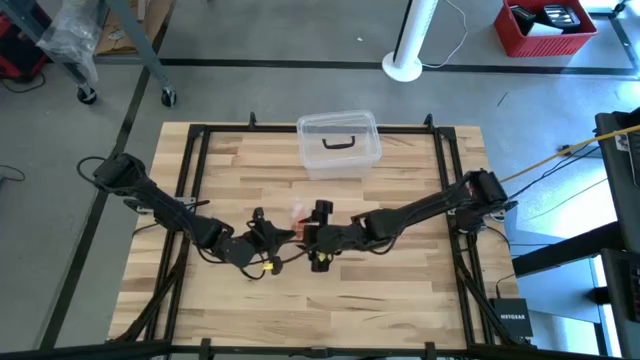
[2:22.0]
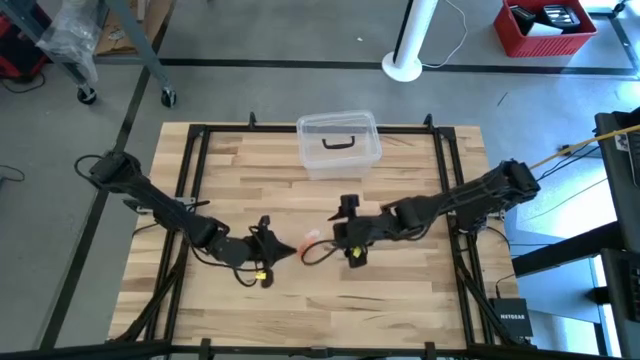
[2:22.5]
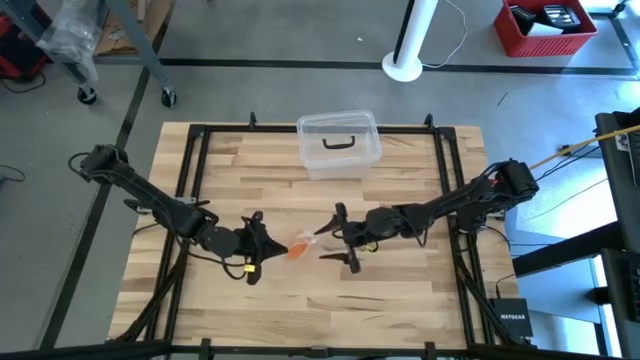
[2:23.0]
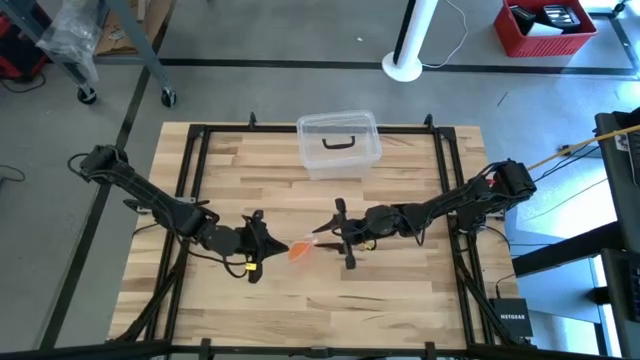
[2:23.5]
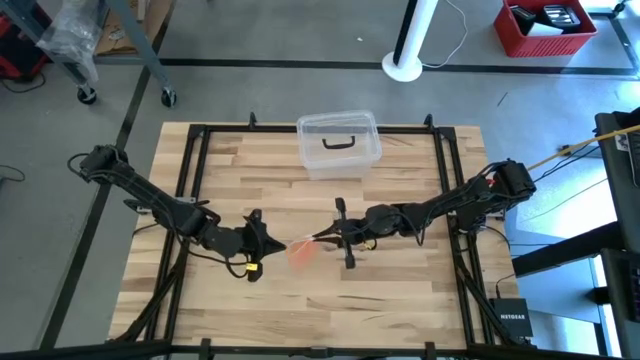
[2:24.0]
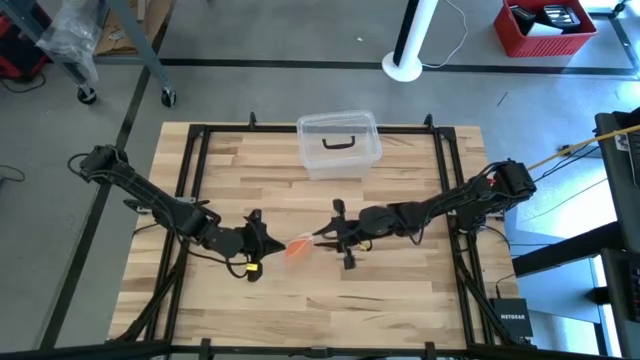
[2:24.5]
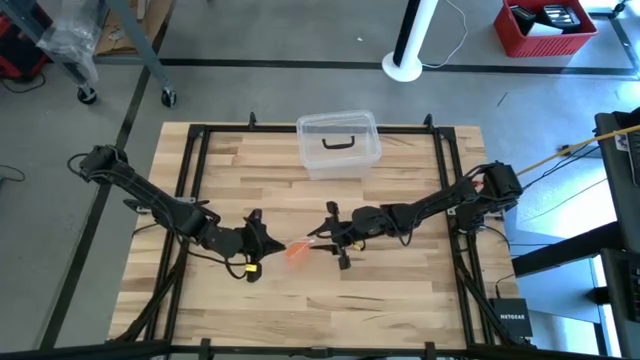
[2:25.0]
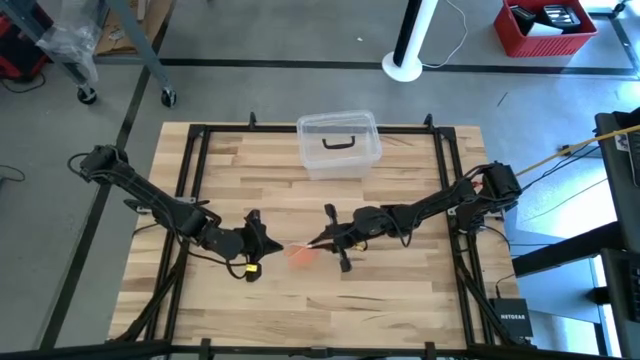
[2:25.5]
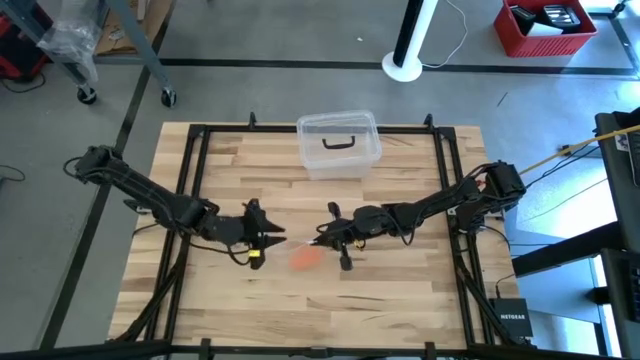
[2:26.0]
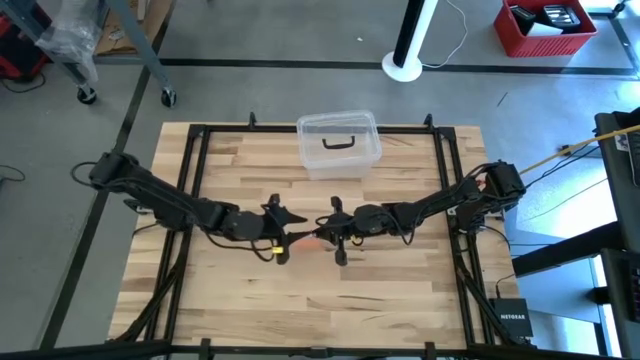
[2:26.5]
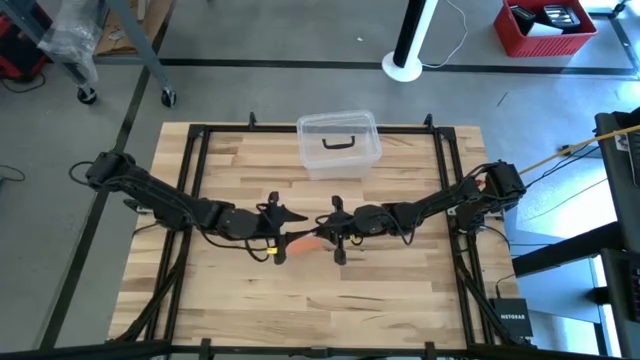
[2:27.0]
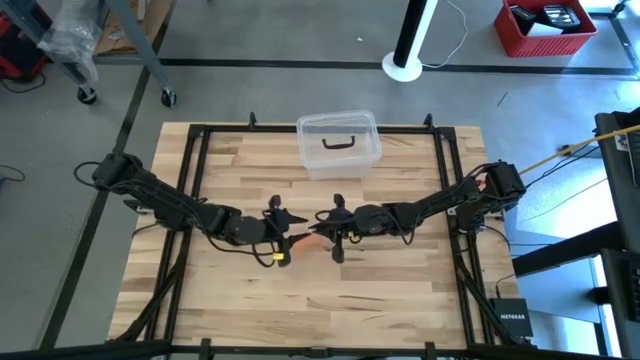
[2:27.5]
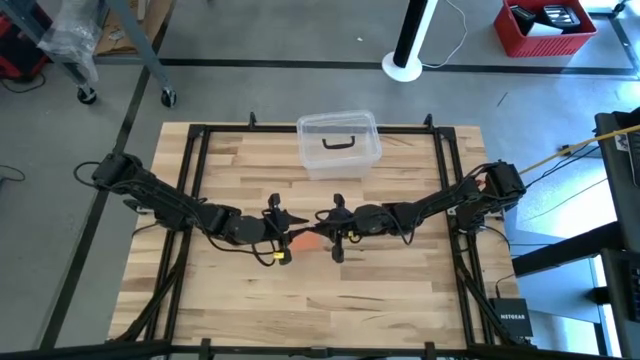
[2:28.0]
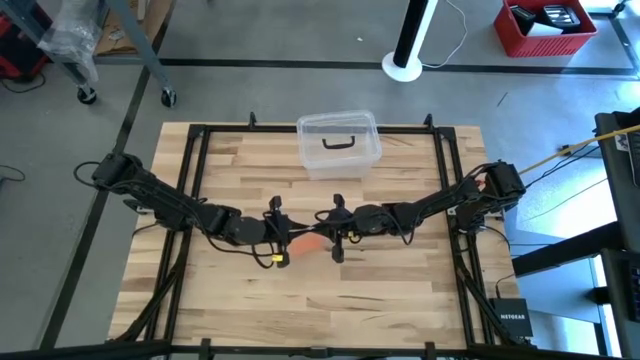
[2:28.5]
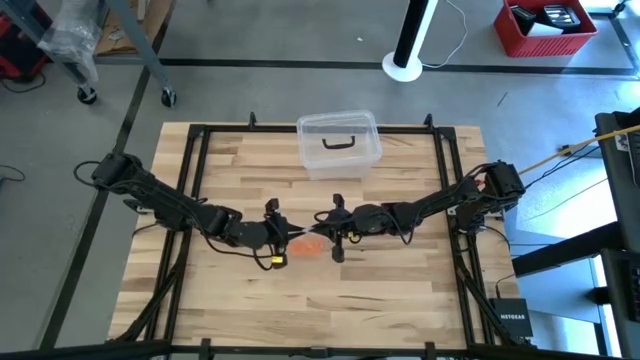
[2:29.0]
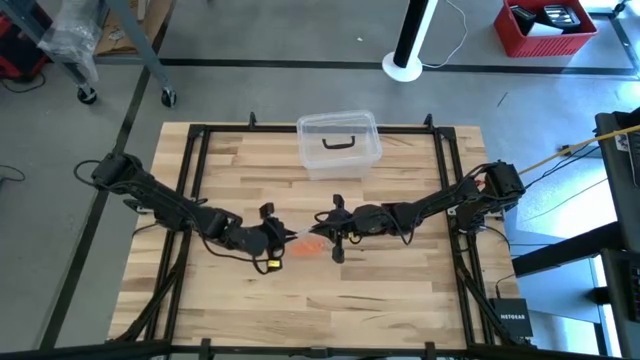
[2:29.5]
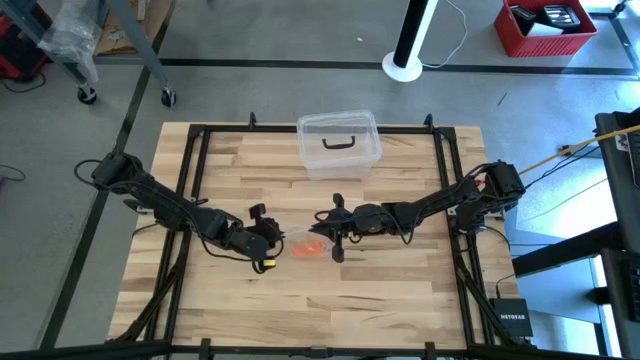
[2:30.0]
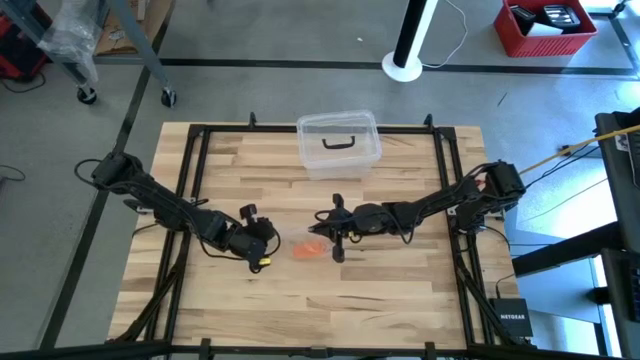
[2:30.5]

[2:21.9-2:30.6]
Task: Roll bandage
Close the transparent zip bag

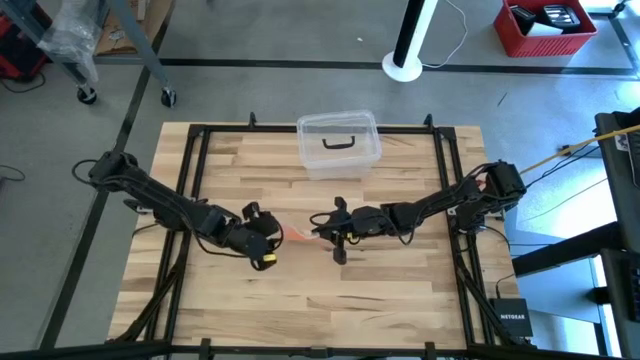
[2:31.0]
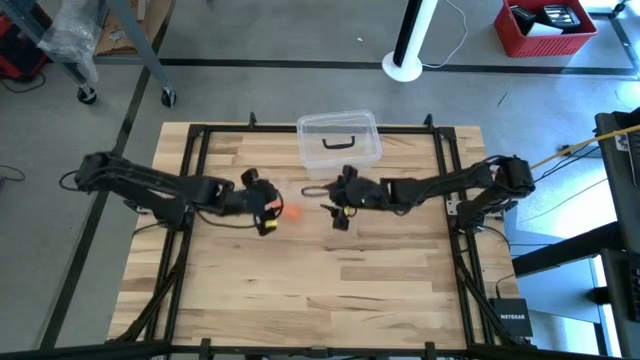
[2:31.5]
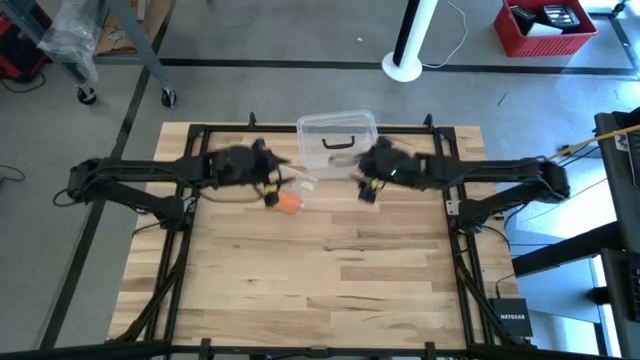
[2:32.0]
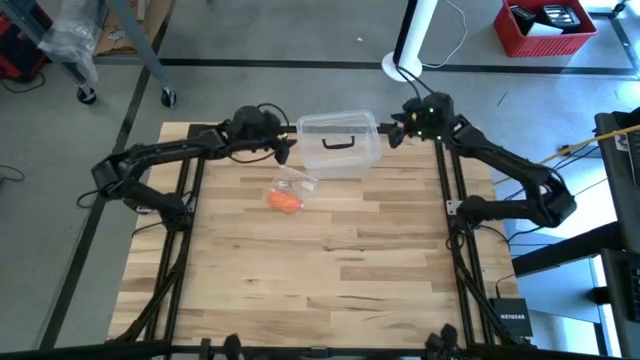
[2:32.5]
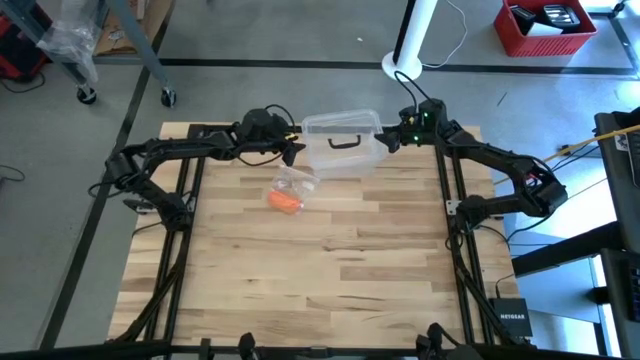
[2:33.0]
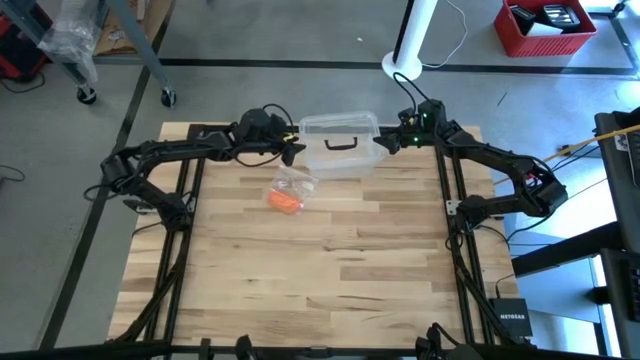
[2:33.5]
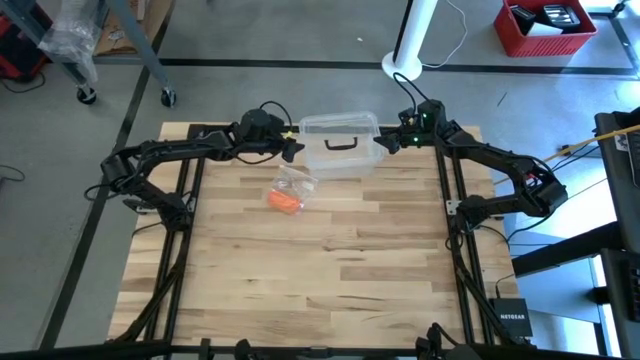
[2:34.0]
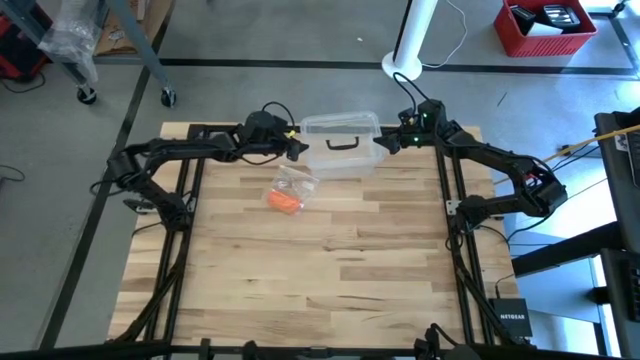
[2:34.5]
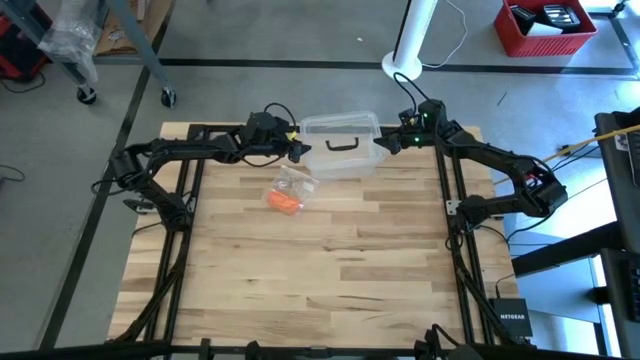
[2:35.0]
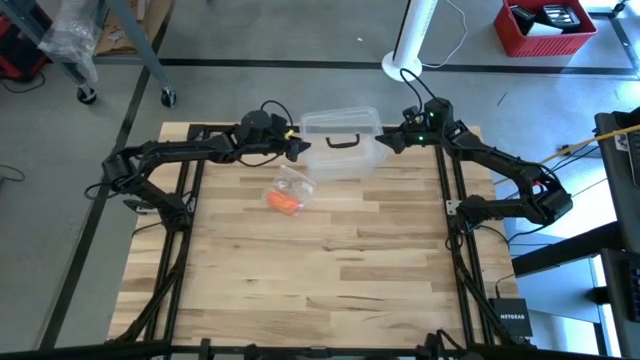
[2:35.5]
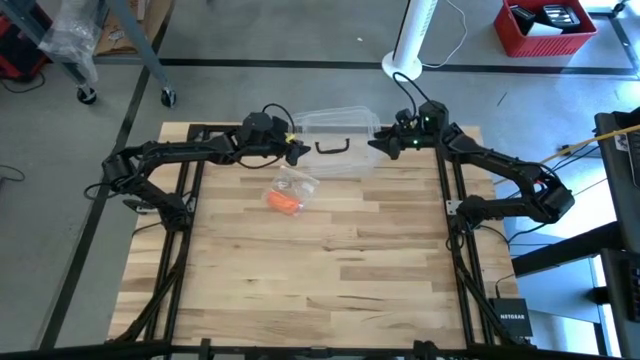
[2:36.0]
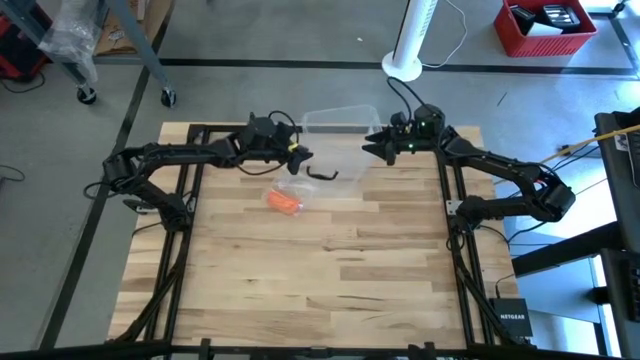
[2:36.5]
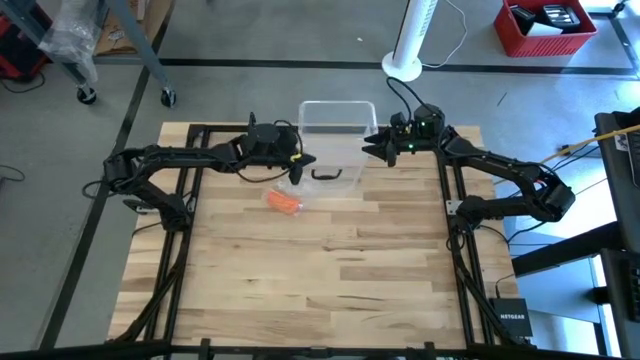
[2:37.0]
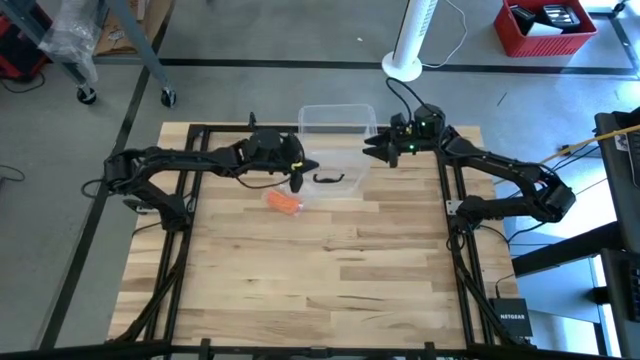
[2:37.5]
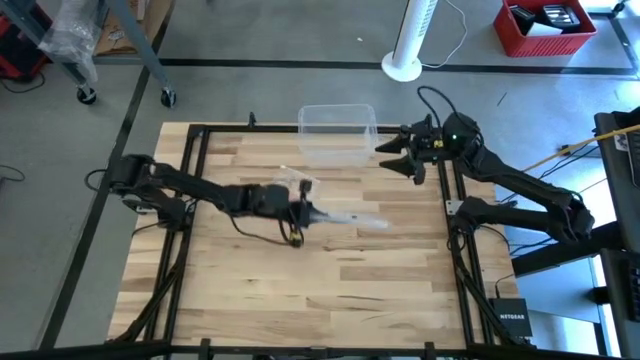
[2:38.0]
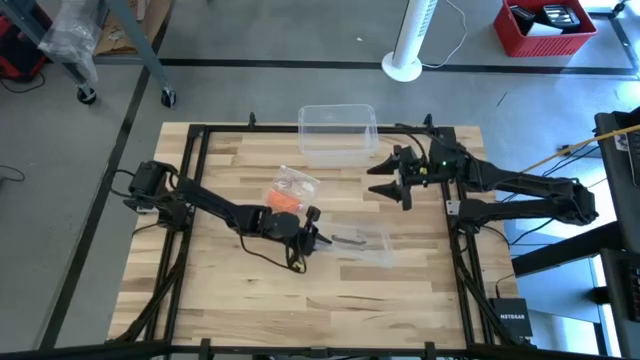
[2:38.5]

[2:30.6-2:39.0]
Open the transparent bin
